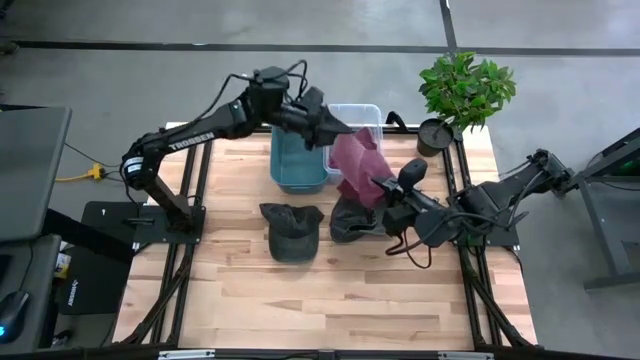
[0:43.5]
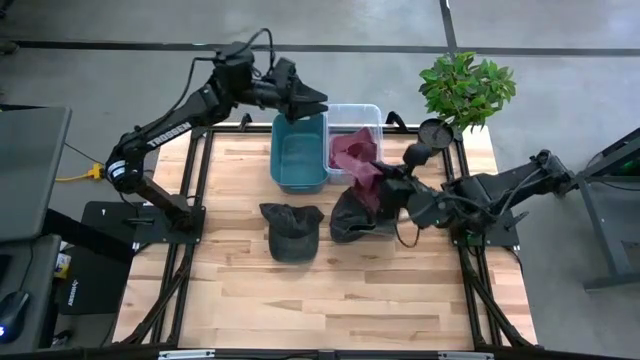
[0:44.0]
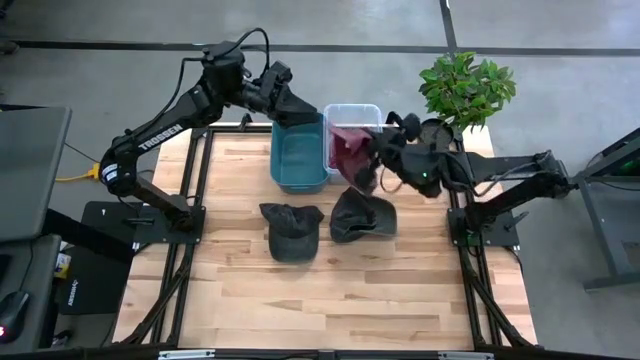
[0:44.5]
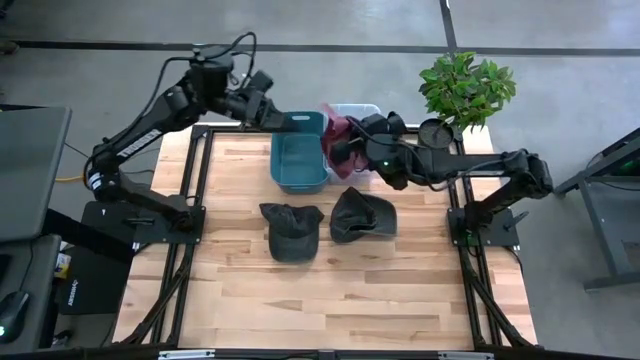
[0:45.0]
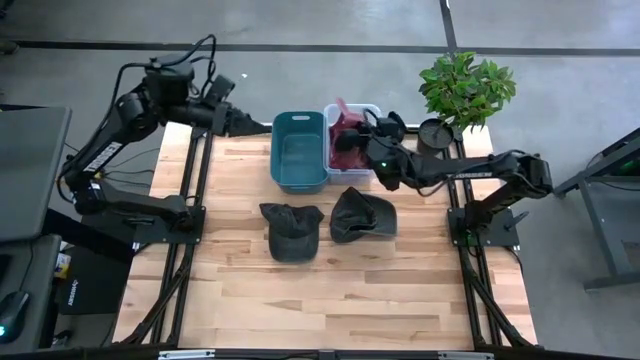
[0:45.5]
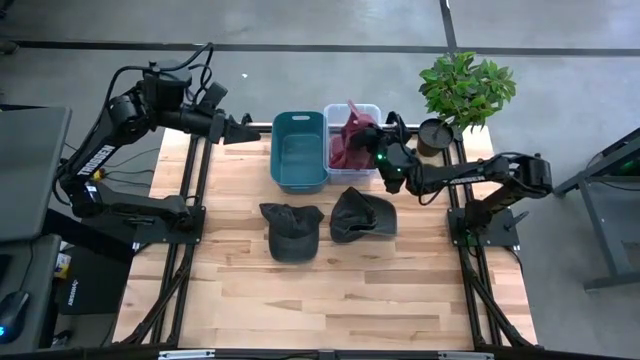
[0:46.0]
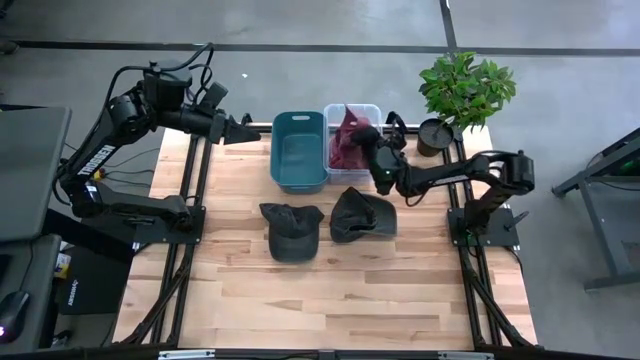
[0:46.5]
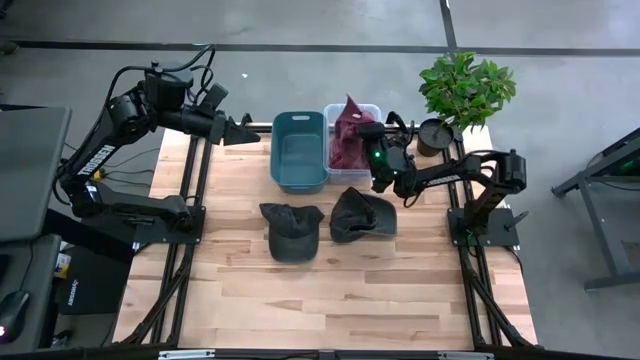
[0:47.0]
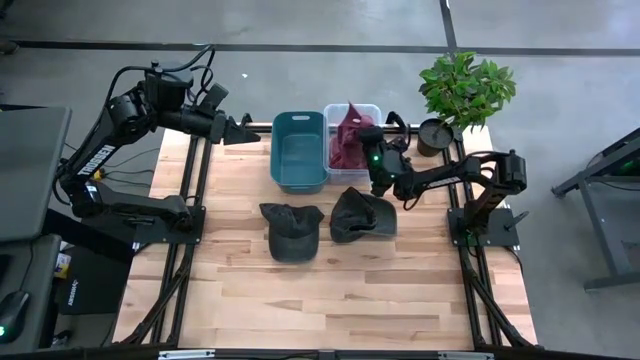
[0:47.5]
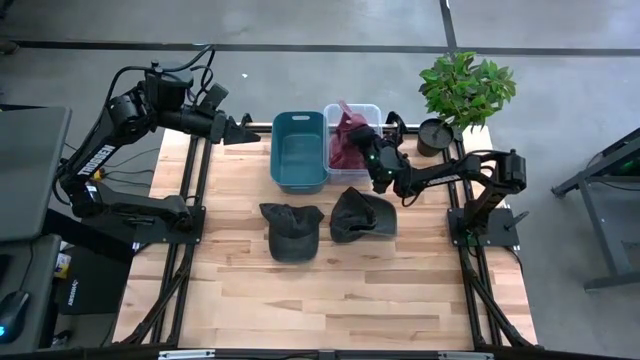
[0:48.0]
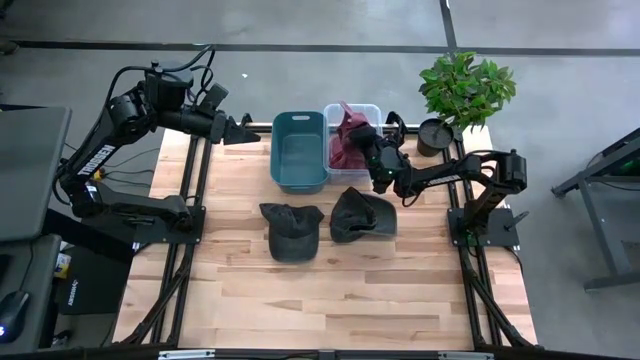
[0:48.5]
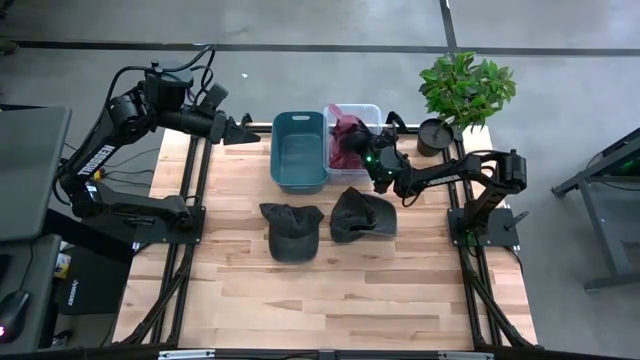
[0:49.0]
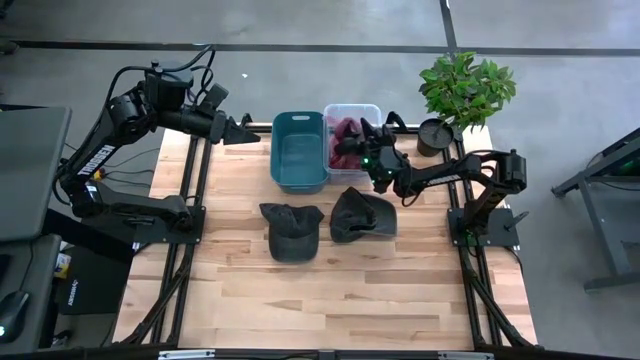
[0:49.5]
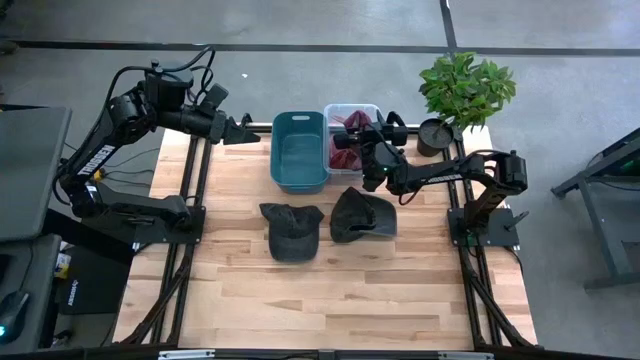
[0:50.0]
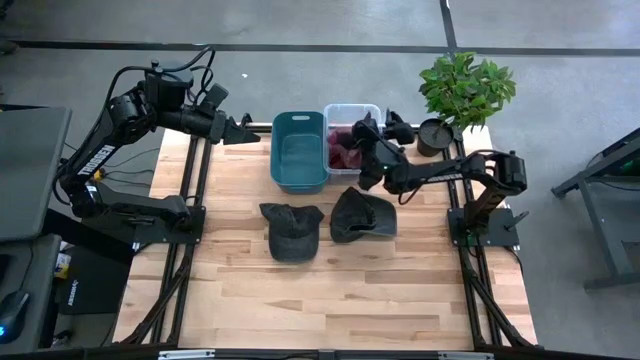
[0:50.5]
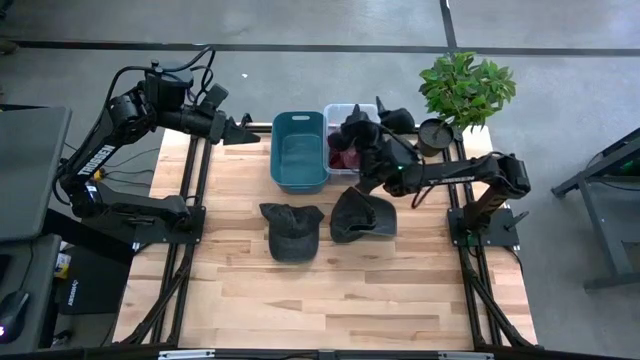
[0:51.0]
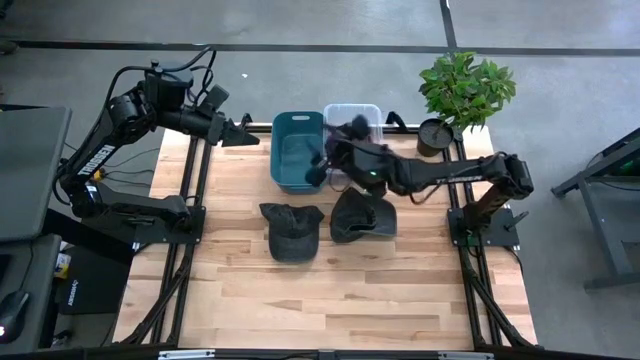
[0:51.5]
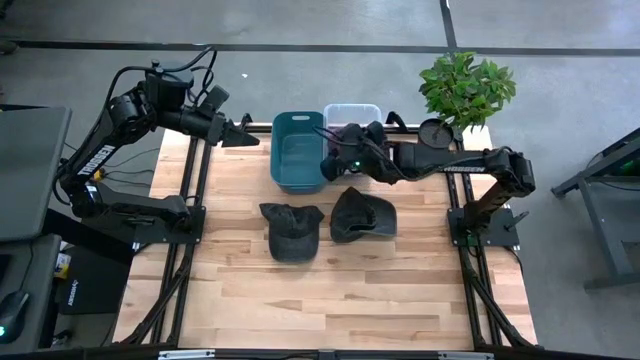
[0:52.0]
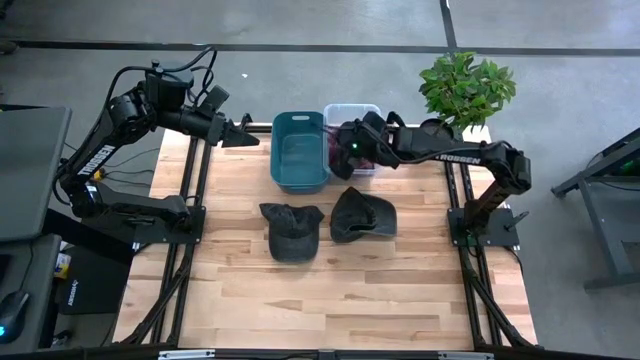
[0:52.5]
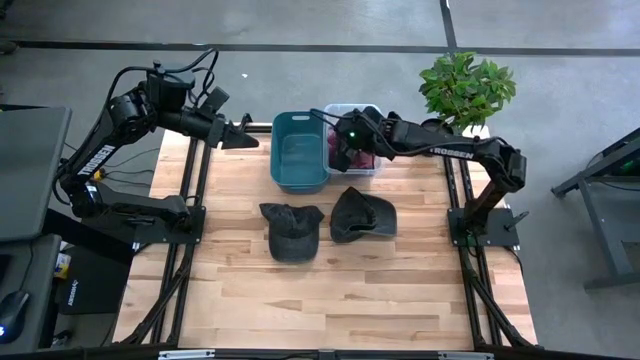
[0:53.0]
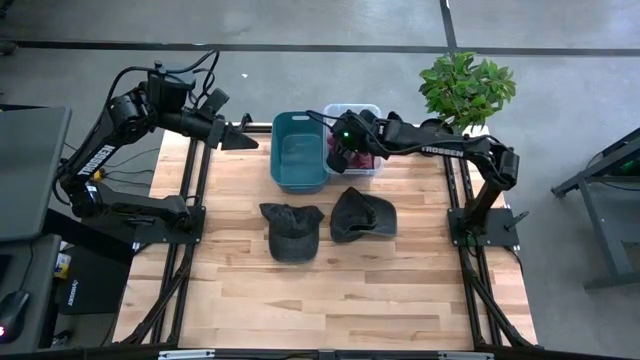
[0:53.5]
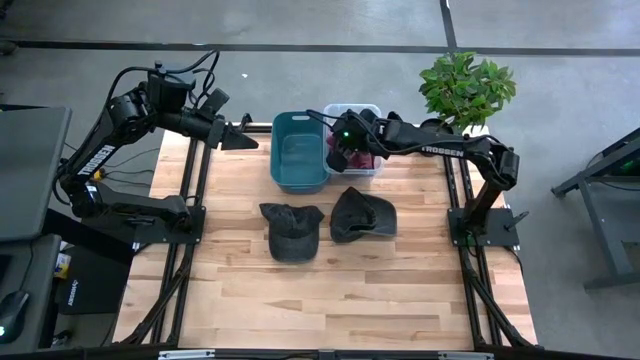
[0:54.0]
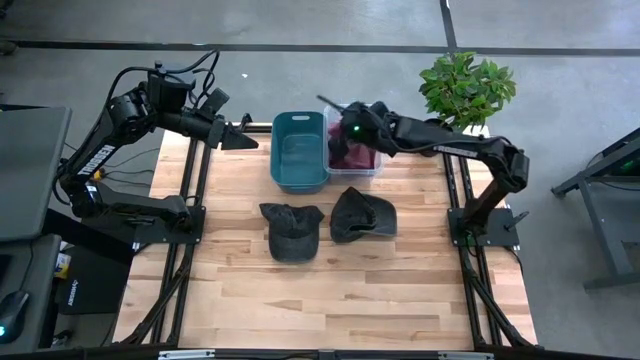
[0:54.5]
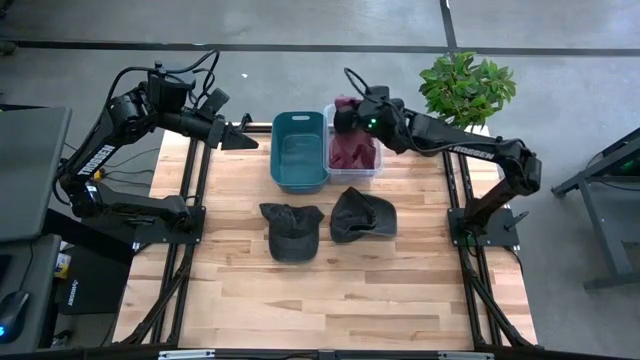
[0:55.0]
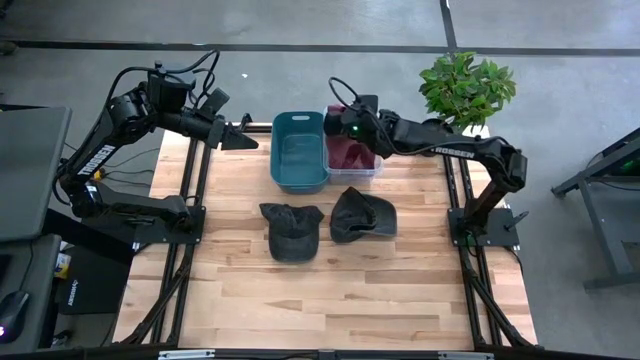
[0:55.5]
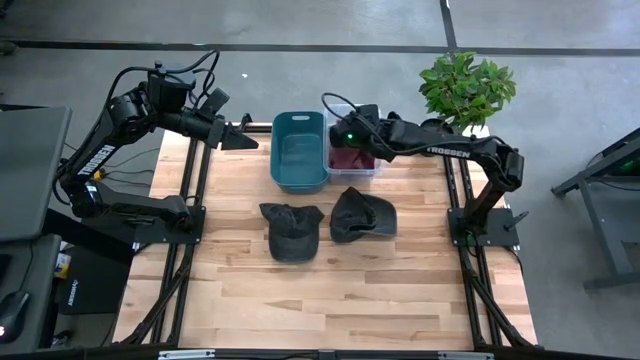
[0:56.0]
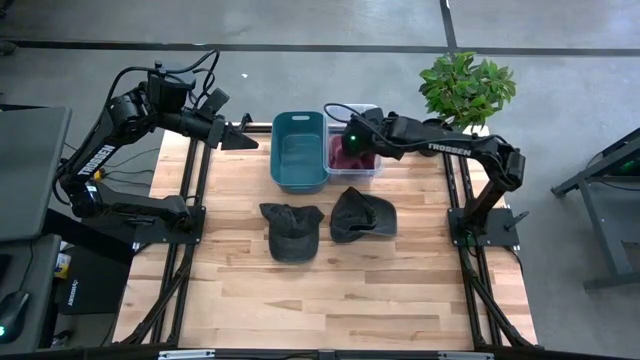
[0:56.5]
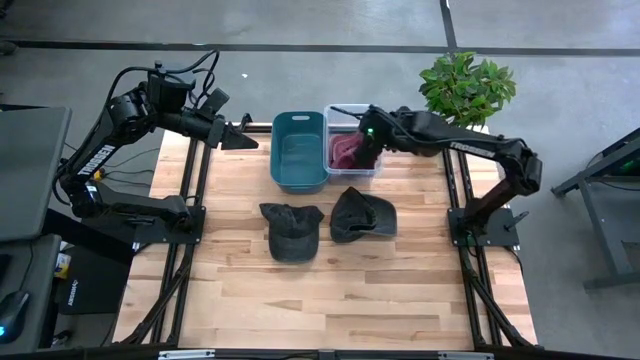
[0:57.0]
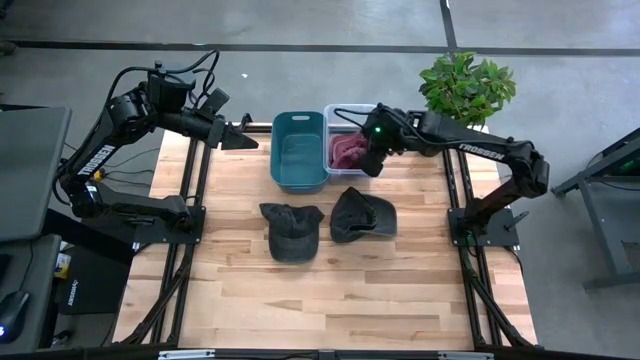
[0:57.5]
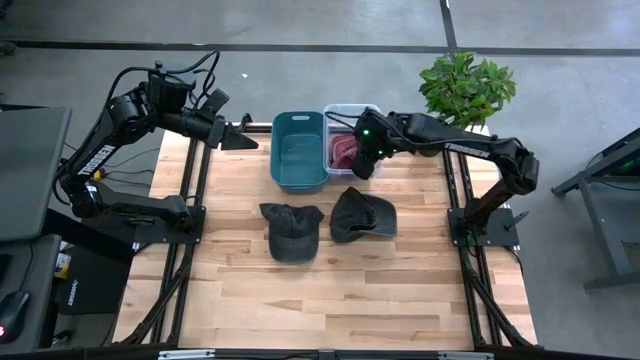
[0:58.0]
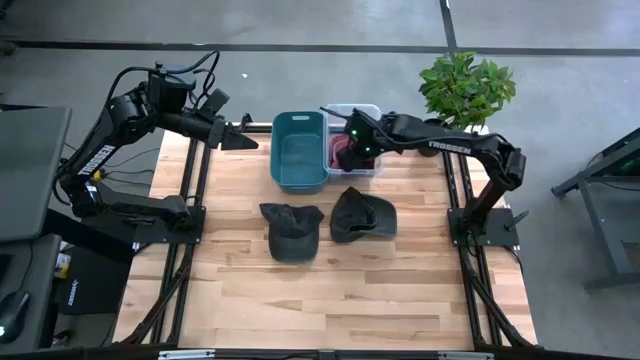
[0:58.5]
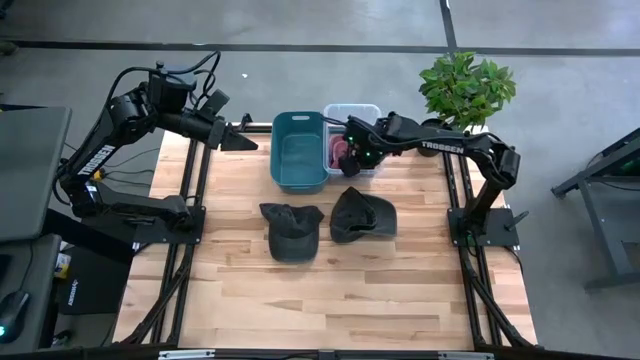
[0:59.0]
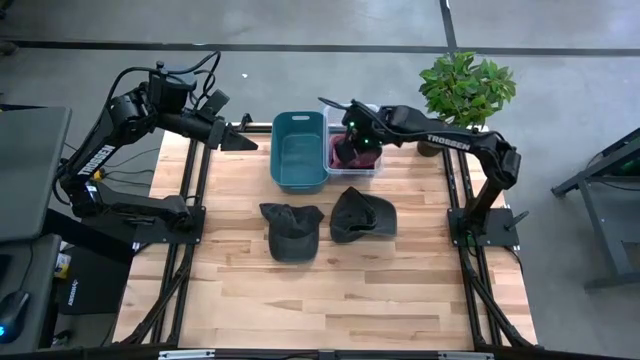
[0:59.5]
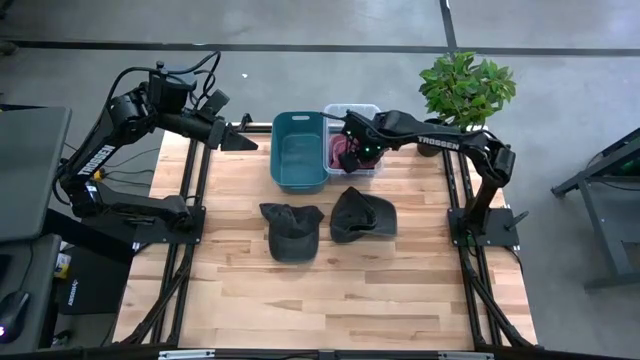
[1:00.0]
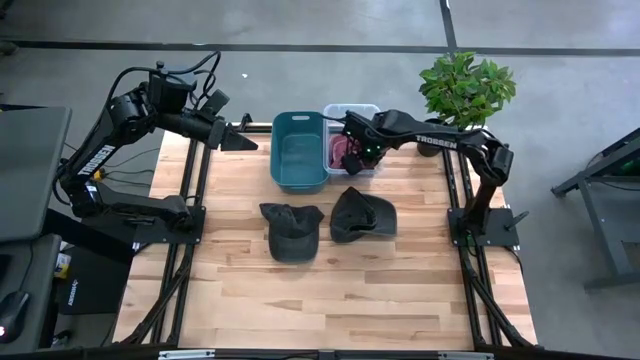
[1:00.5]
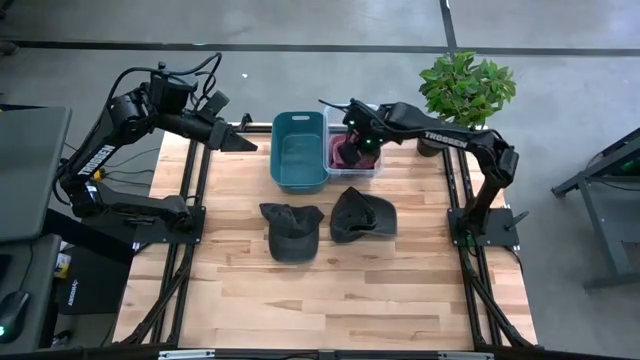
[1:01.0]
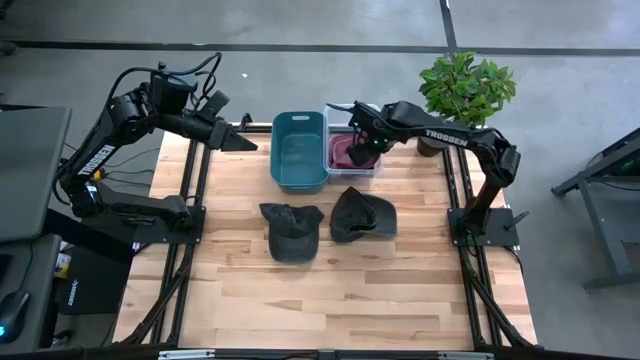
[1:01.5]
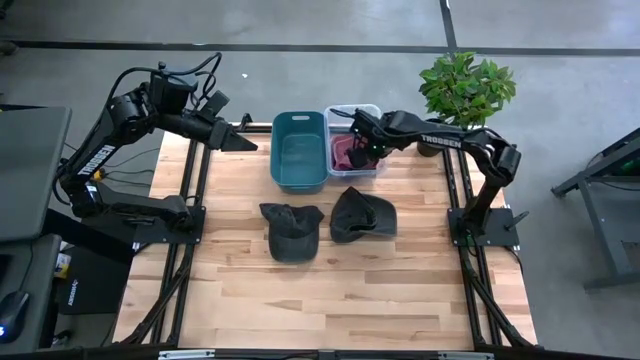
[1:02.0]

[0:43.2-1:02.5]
Task: Pick & Place hat
Put the red cap into the transparent bin
